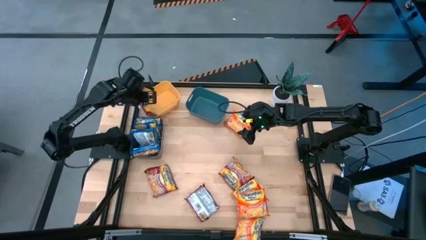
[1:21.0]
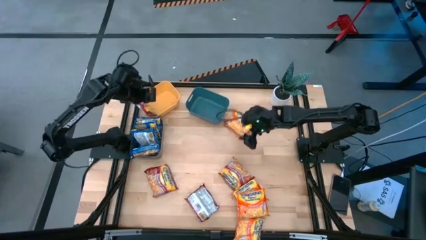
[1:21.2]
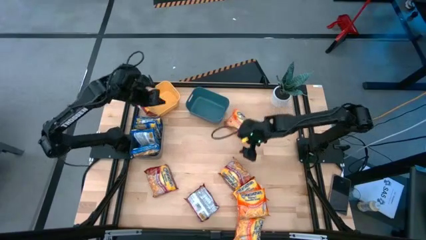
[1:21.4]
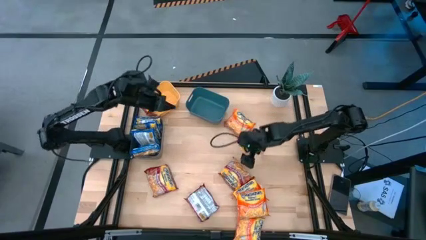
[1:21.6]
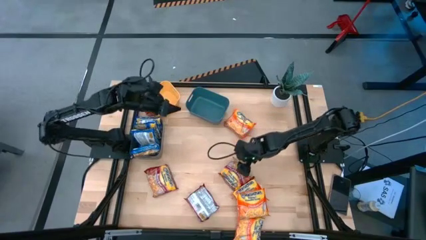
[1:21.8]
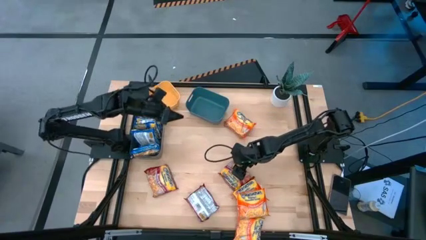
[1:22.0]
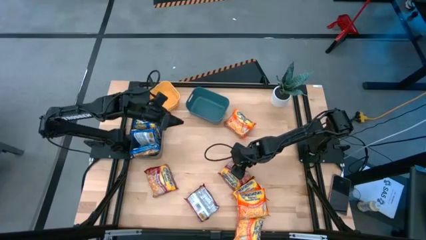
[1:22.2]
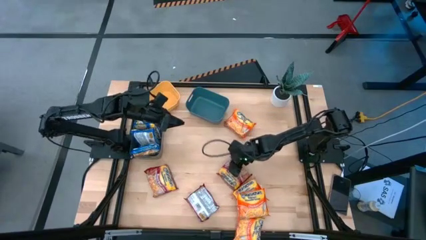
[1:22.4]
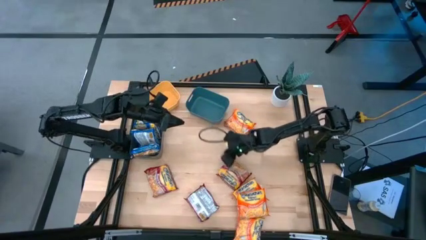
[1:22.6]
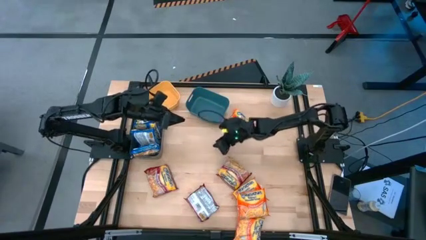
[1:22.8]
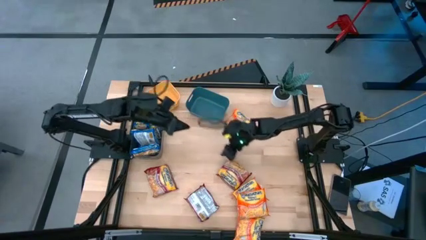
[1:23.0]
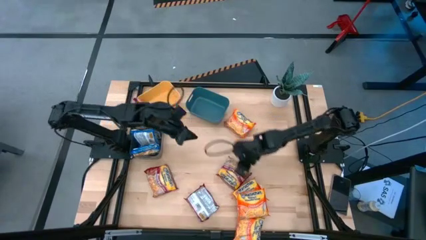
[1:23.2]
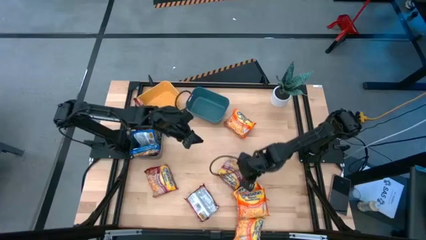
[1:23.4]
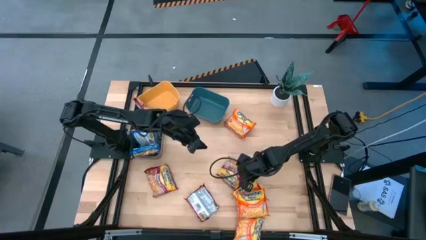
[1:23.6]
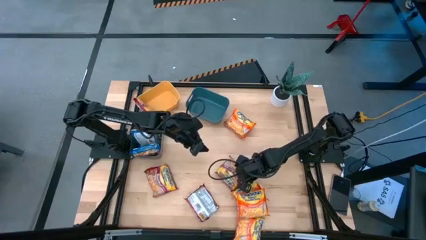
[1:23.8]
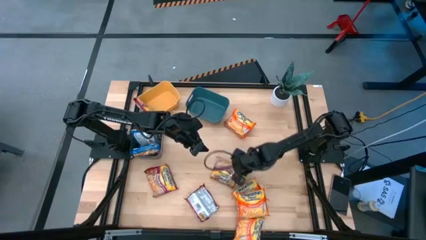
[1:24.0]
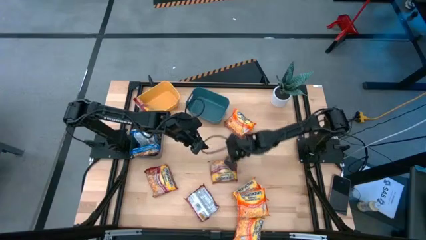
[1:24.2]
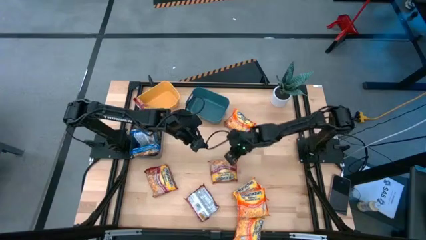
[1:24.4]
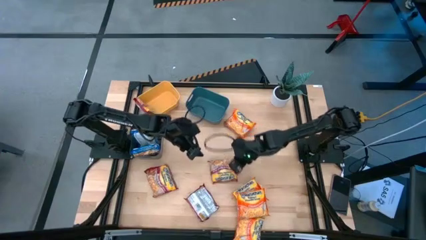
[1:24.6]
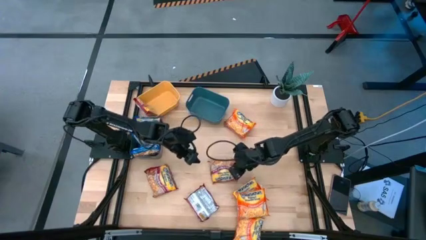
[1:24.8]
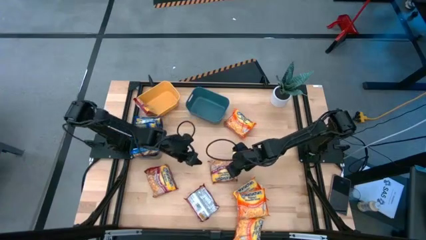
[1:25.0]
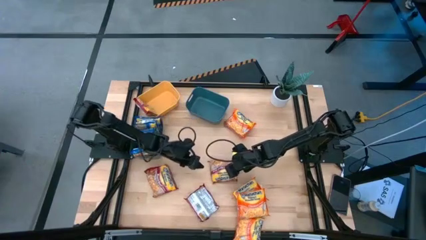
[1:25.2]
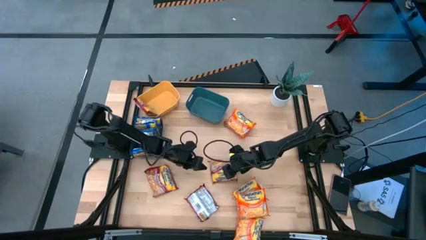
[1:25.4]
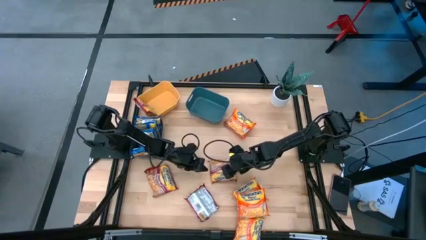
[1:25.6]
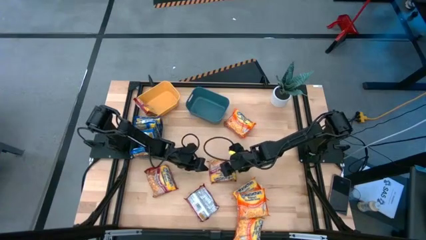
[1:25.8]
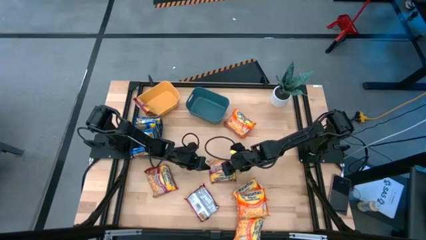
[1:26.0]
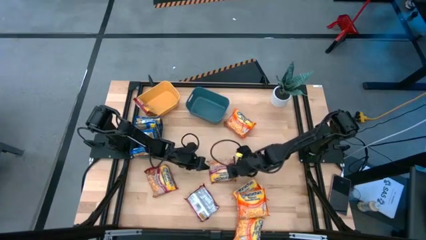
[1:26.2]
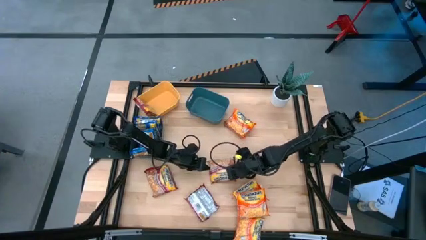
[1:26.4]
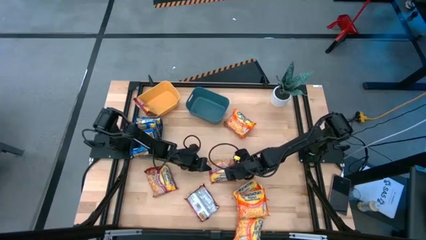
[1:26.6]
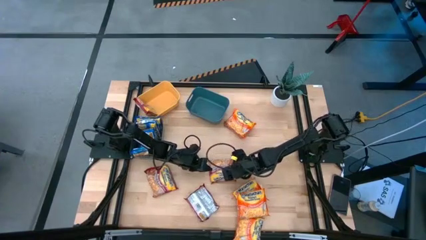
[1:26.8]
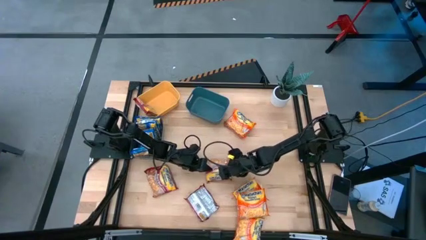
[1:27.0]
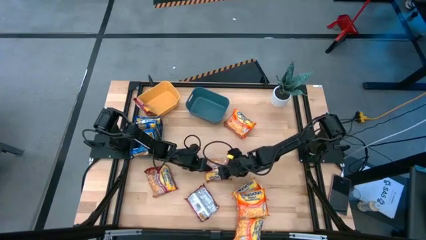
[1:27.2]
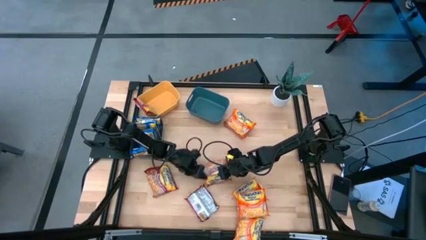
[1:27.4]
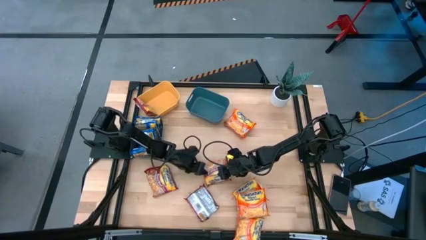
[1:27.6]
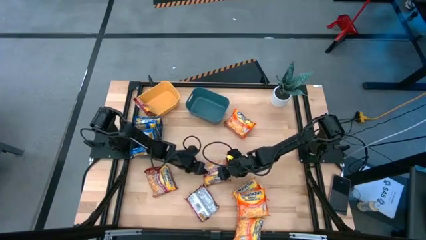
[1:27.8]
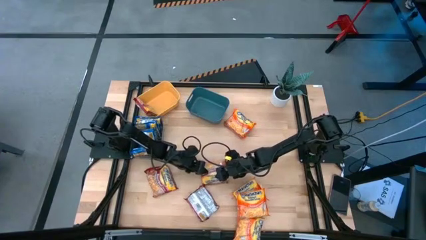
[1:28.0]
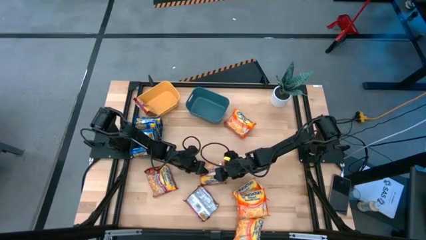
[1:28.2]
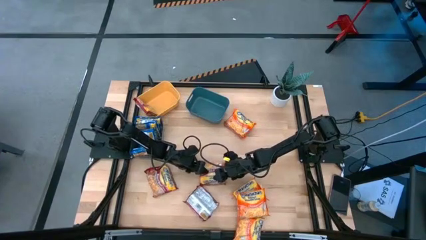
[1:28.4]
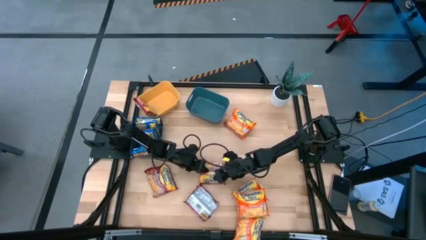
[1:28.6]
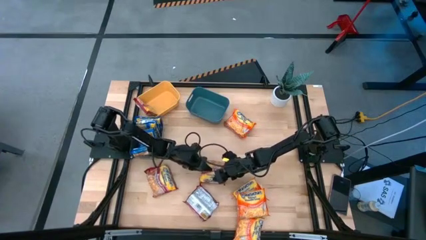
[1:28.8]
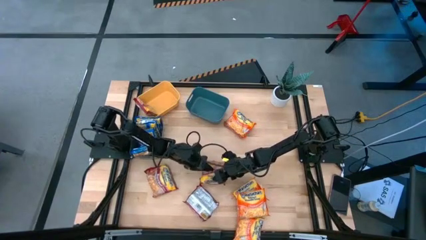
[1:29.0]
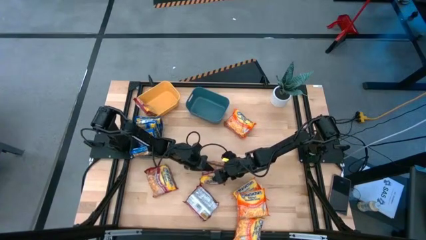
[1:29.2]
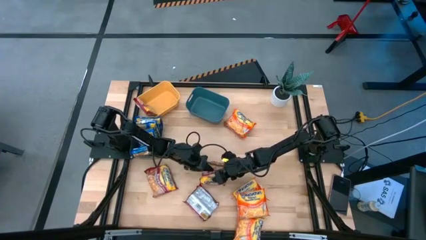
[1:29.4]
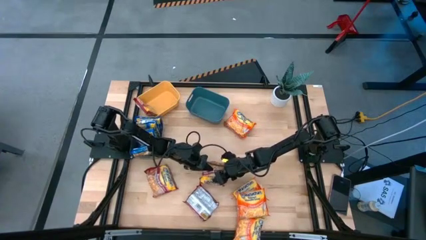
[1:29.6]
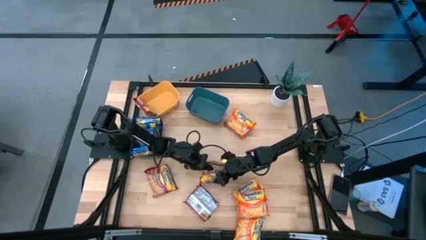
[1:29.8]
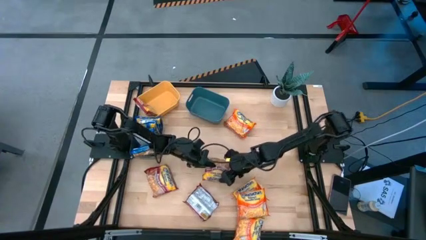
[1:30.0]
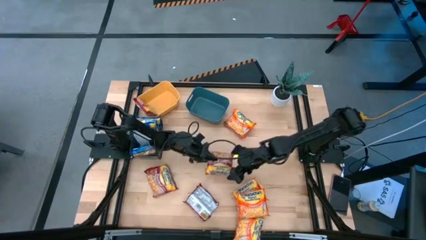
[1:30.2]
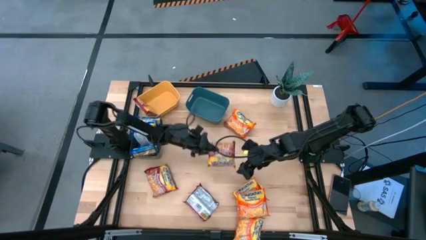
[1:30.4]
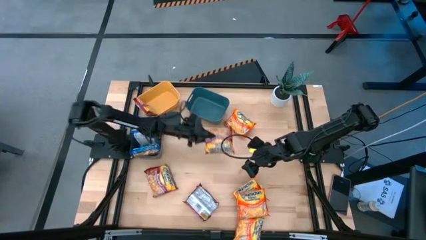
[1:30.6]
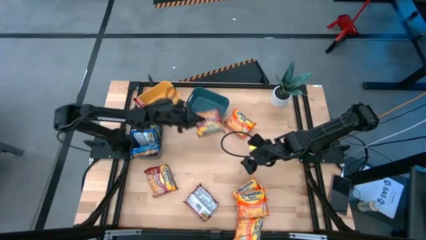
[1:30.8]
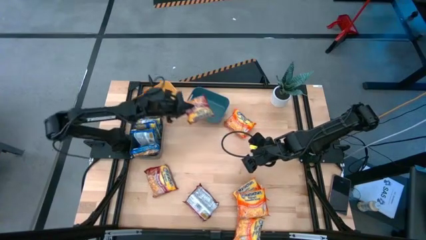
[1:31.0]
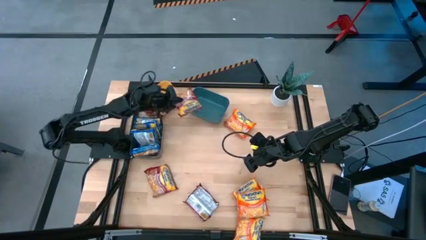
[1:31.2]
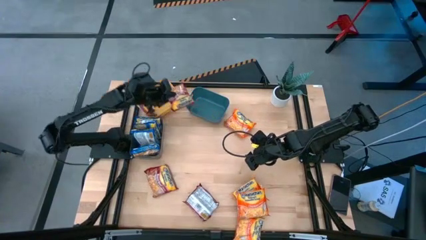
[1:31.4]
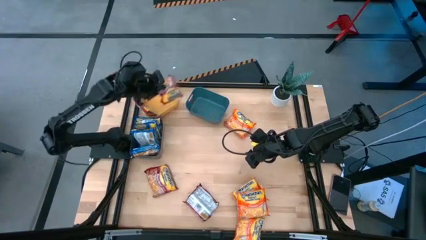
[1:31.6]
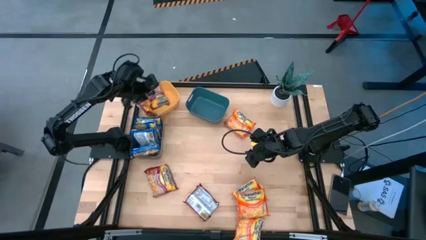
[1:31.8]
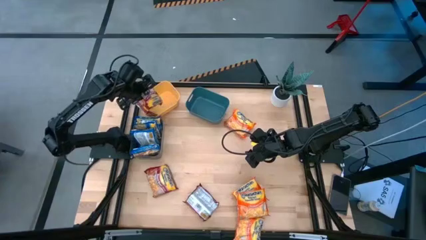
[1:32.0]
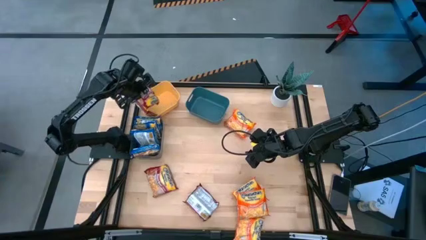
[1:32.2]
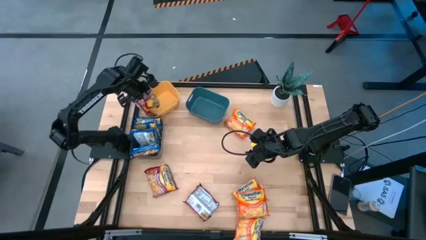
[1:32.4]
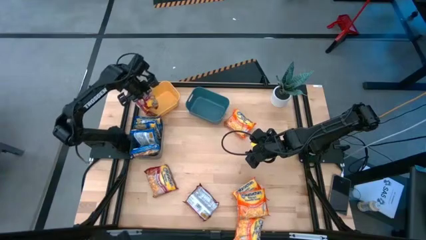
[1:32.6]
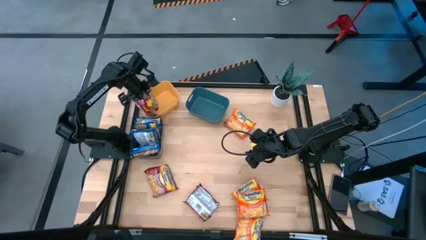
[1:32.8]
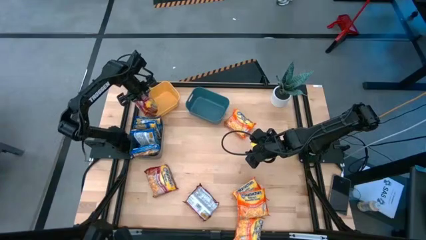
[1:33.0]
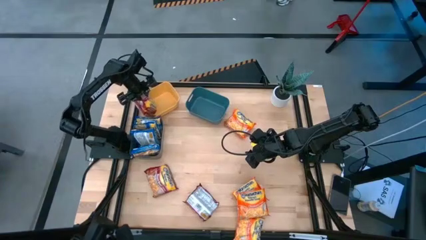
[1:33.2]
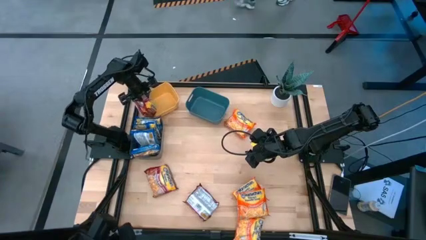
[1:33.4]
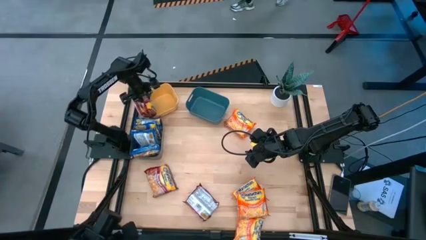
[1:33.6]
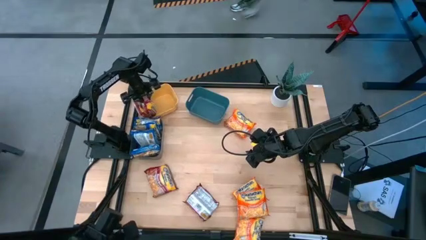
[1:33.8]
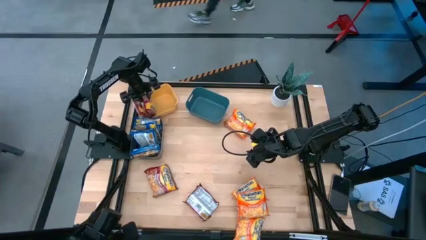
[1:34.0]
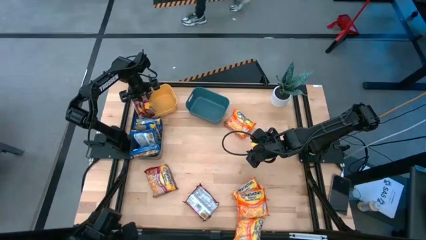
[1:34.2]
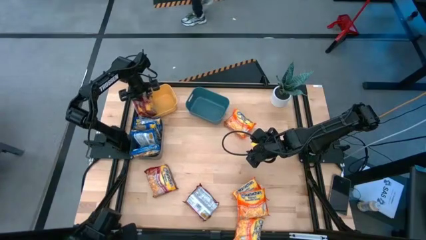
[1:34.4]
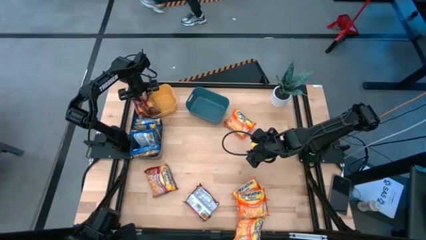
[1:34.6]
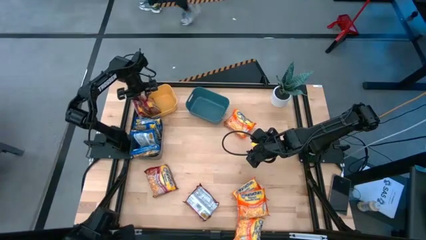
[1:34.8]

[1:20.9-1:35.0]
Task: Sort Maruchan noodles
Put the red noodle pack into the yellow bin
